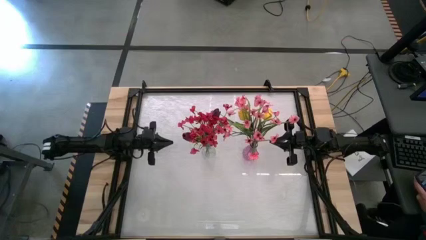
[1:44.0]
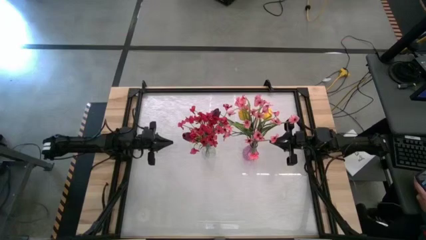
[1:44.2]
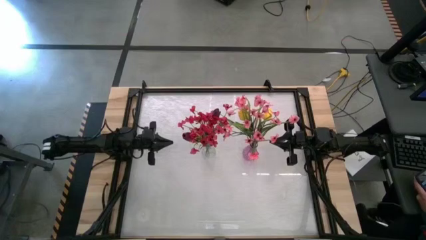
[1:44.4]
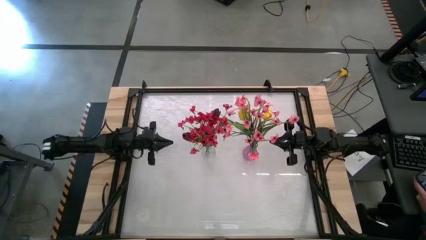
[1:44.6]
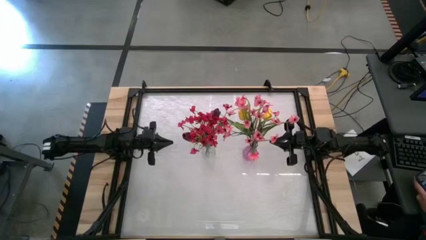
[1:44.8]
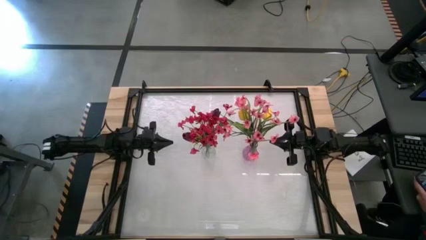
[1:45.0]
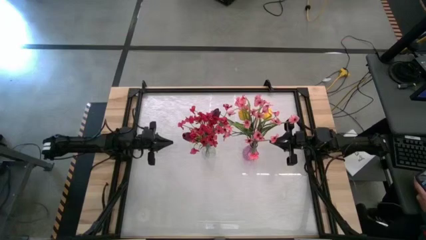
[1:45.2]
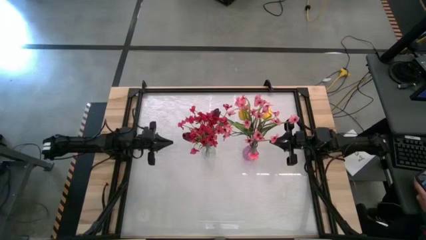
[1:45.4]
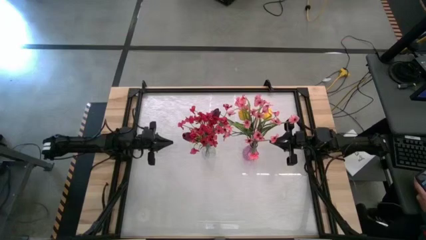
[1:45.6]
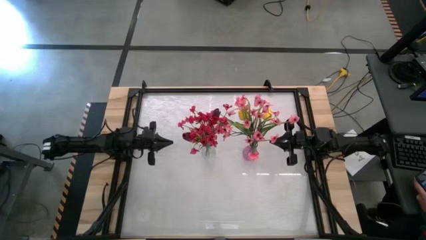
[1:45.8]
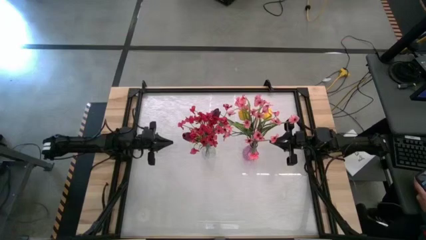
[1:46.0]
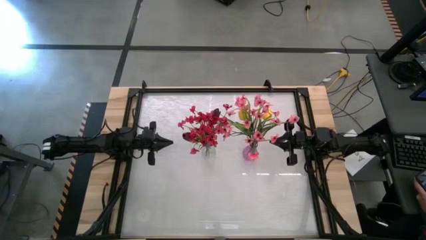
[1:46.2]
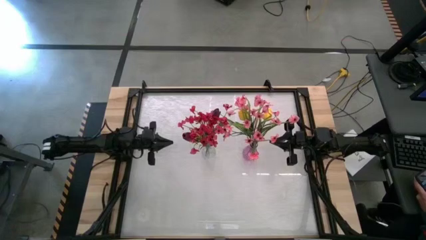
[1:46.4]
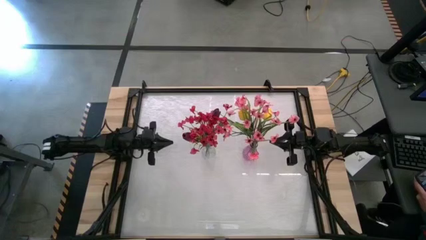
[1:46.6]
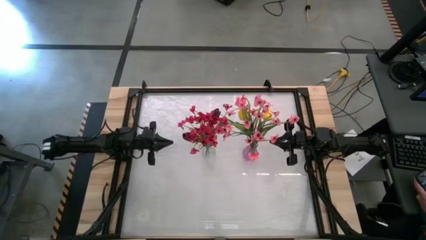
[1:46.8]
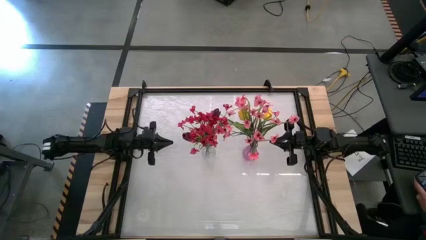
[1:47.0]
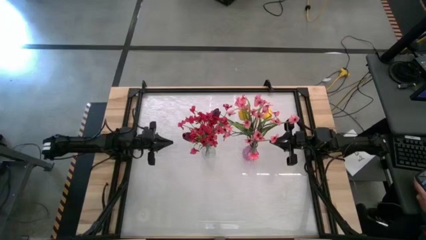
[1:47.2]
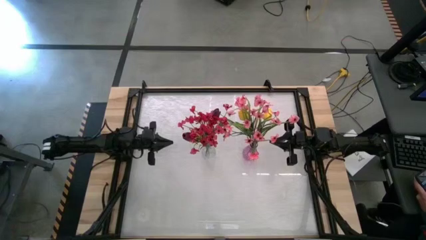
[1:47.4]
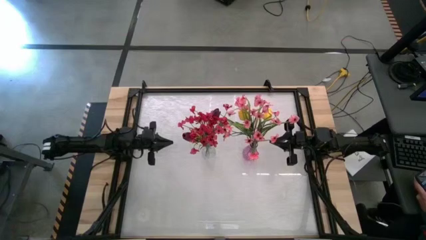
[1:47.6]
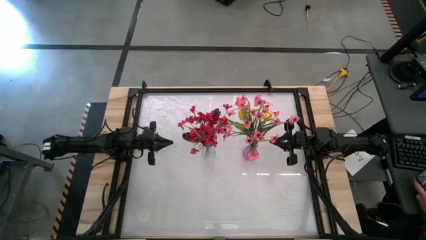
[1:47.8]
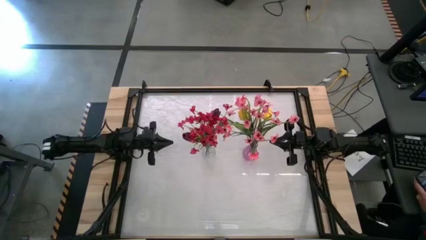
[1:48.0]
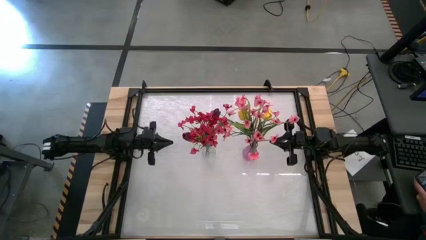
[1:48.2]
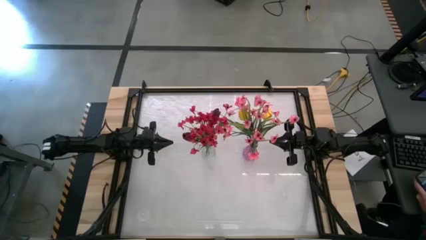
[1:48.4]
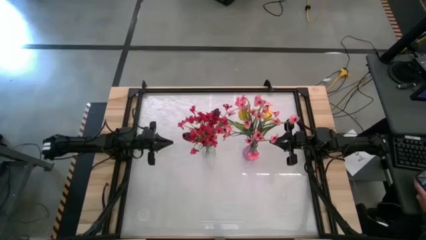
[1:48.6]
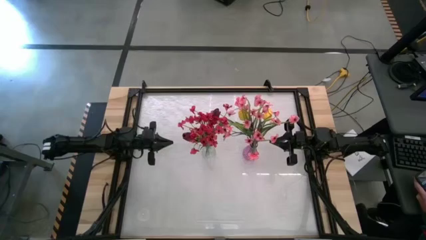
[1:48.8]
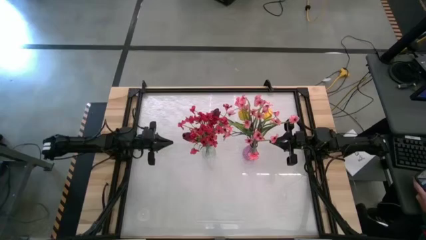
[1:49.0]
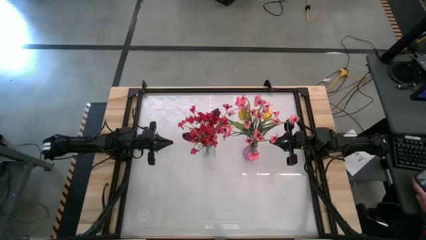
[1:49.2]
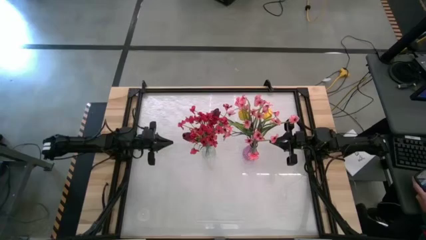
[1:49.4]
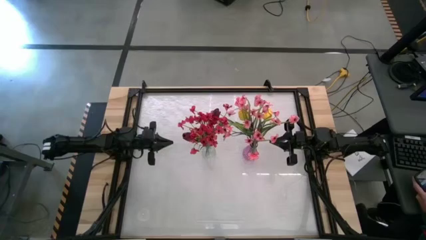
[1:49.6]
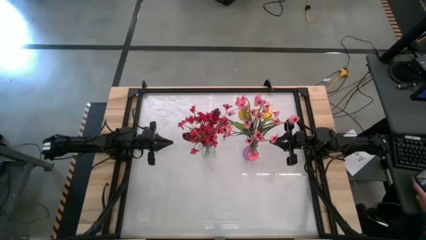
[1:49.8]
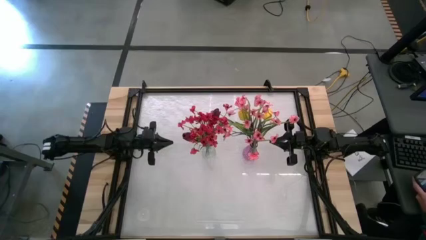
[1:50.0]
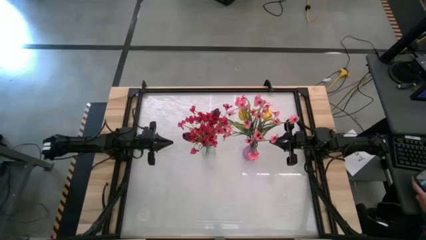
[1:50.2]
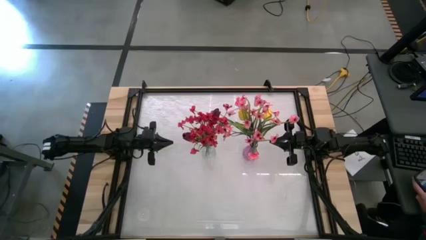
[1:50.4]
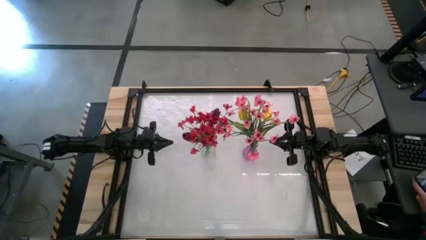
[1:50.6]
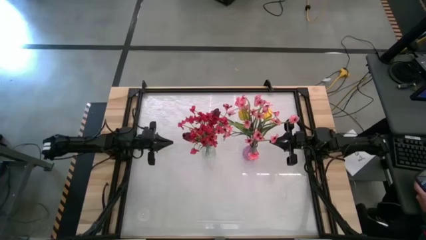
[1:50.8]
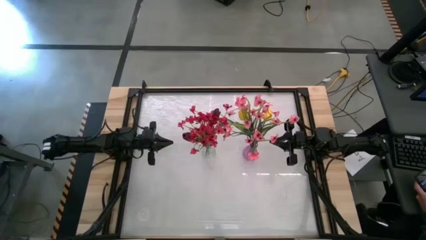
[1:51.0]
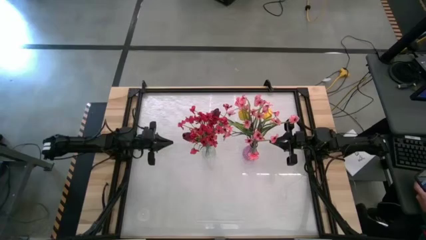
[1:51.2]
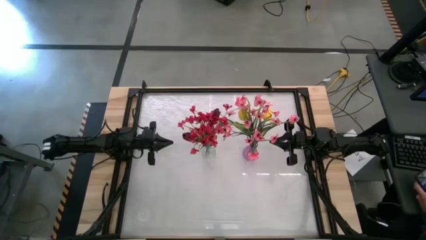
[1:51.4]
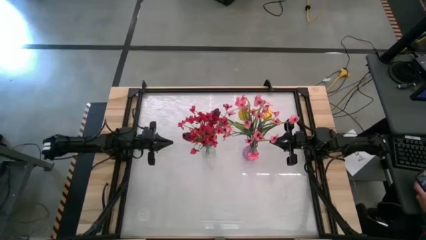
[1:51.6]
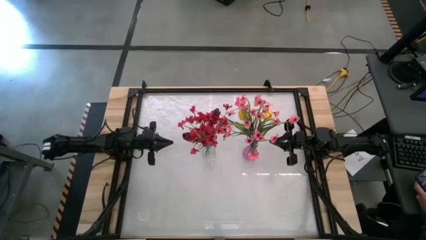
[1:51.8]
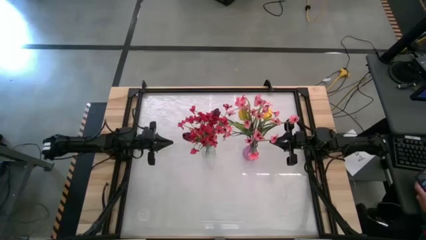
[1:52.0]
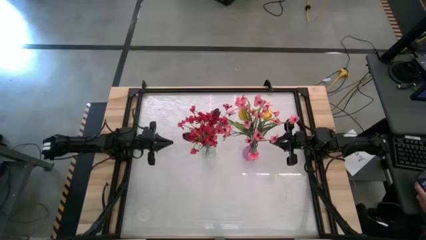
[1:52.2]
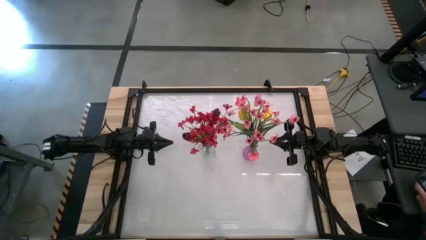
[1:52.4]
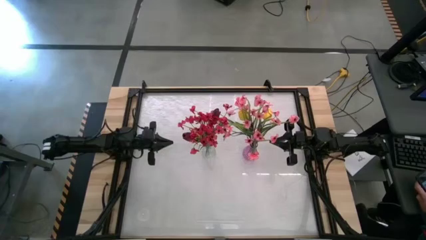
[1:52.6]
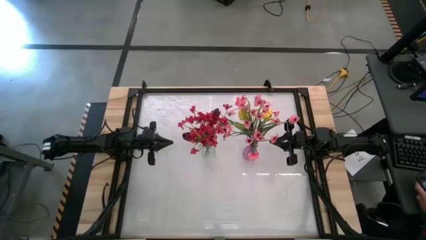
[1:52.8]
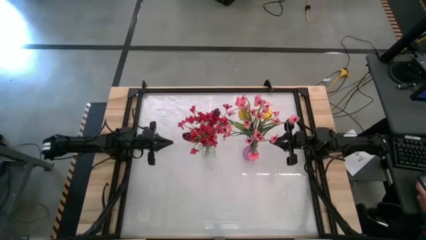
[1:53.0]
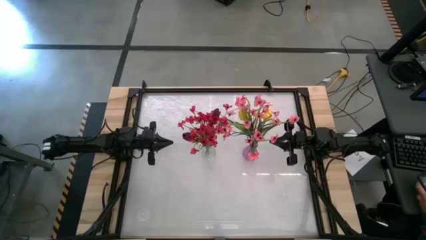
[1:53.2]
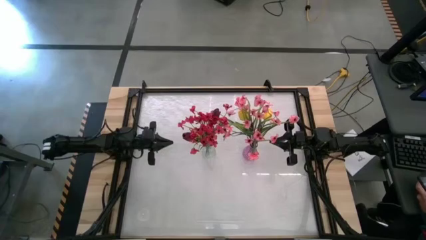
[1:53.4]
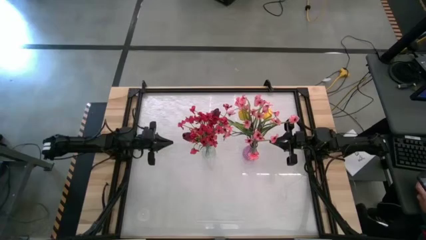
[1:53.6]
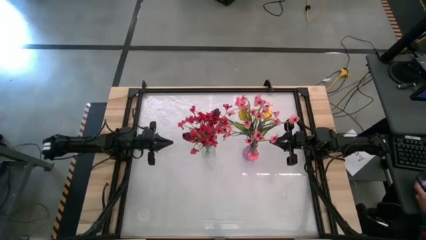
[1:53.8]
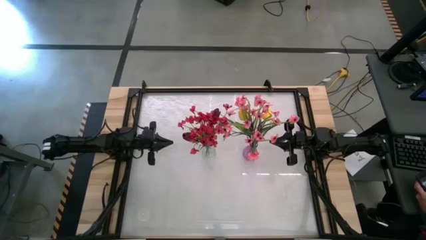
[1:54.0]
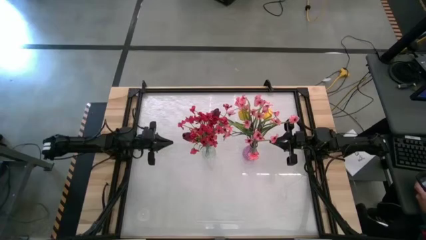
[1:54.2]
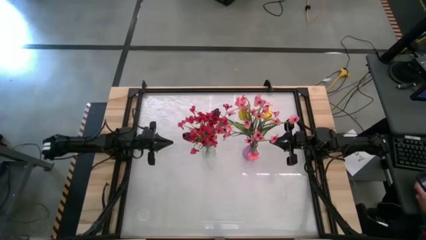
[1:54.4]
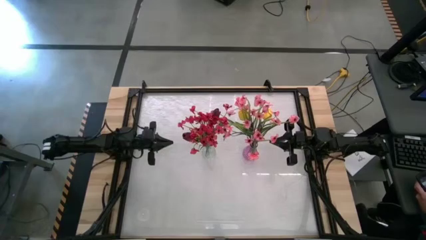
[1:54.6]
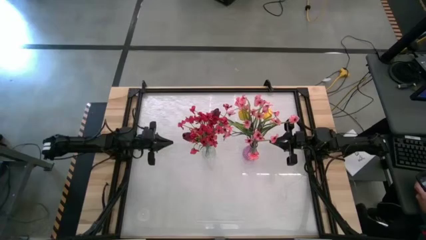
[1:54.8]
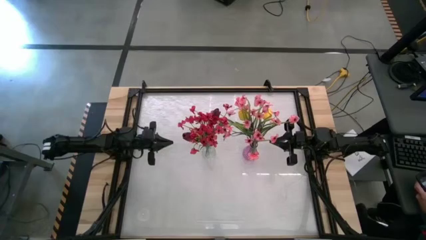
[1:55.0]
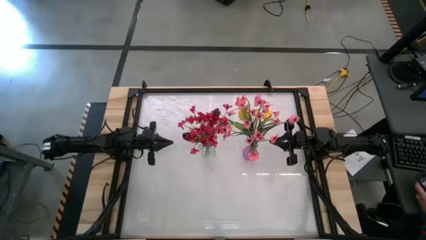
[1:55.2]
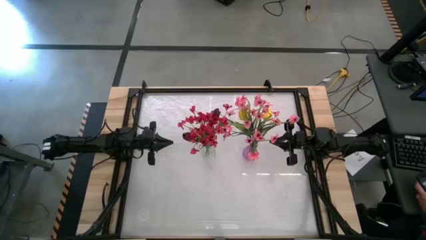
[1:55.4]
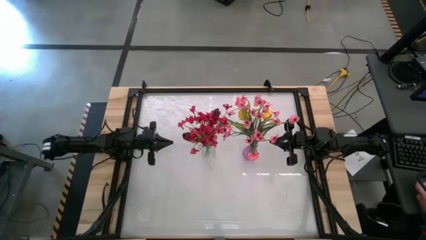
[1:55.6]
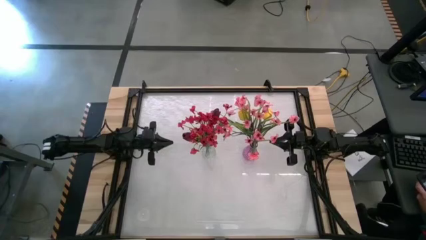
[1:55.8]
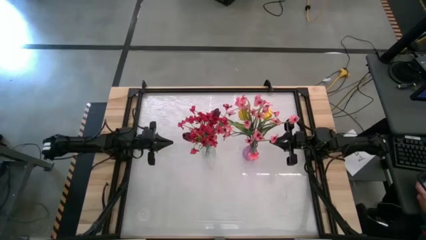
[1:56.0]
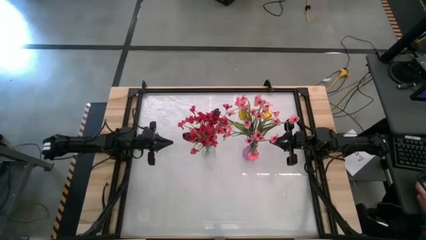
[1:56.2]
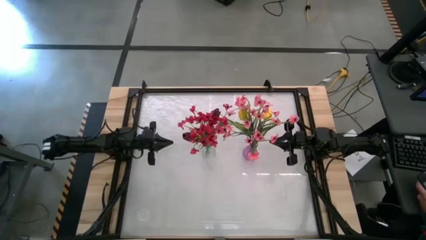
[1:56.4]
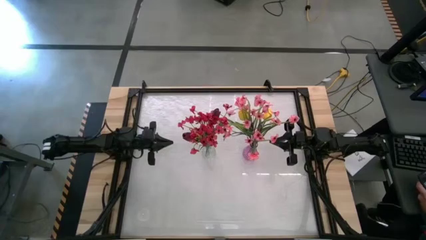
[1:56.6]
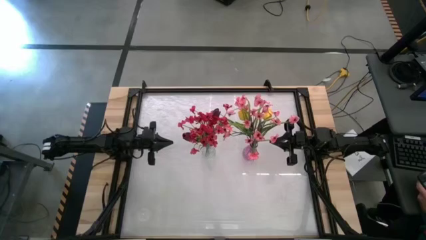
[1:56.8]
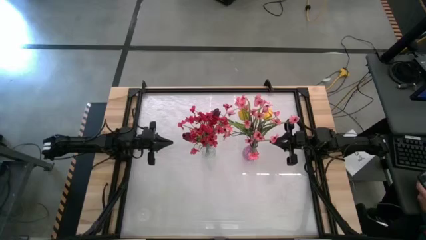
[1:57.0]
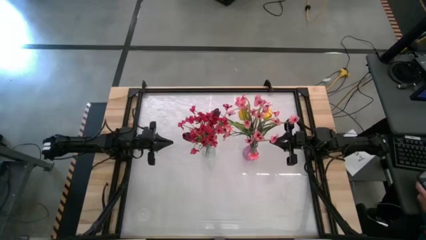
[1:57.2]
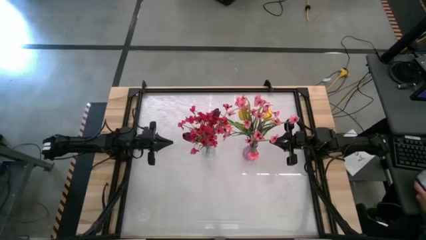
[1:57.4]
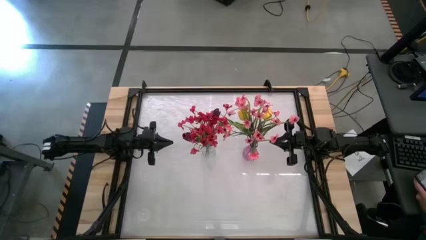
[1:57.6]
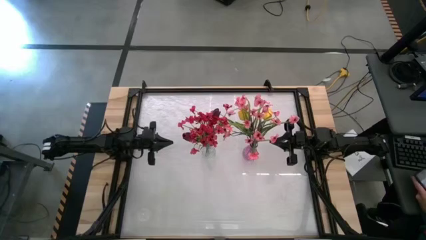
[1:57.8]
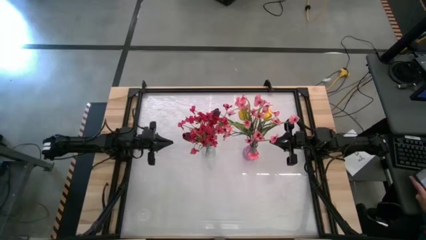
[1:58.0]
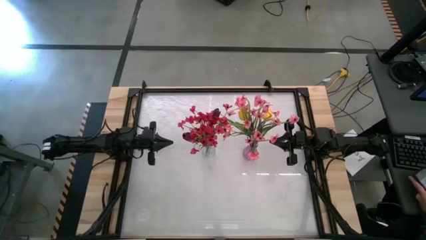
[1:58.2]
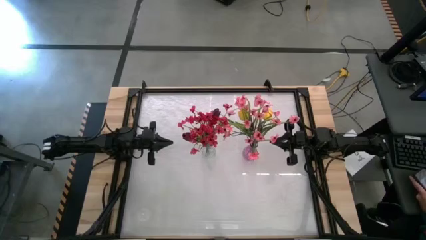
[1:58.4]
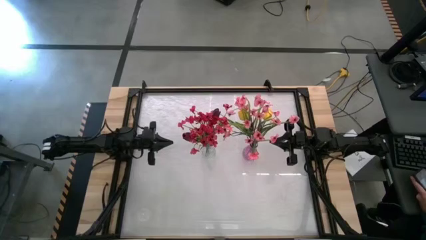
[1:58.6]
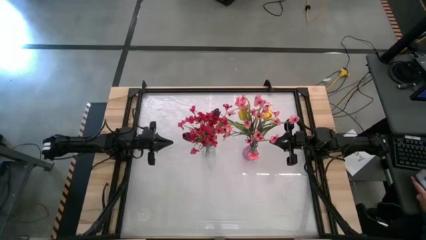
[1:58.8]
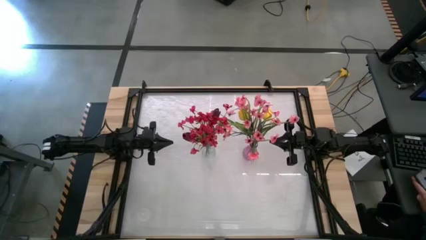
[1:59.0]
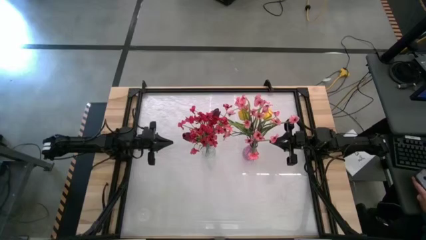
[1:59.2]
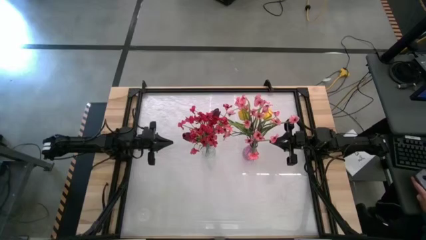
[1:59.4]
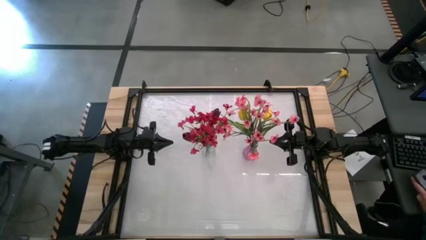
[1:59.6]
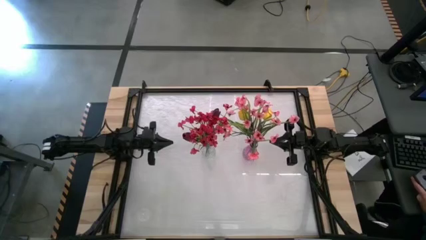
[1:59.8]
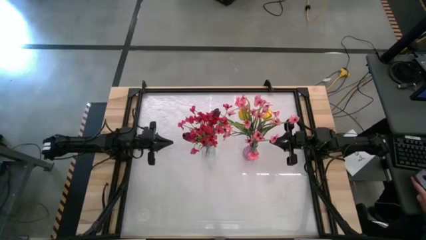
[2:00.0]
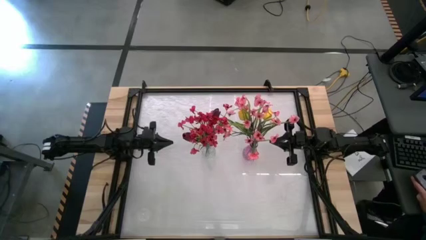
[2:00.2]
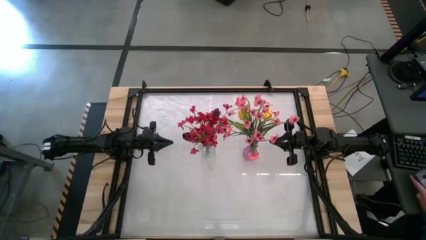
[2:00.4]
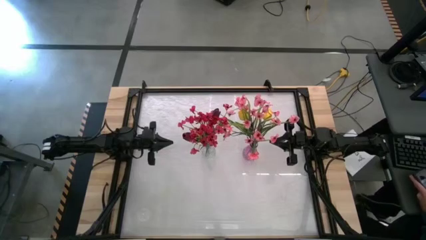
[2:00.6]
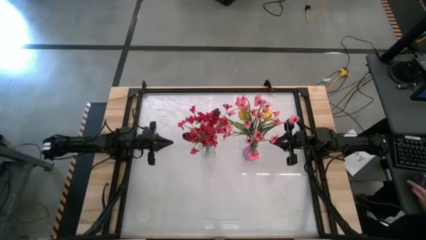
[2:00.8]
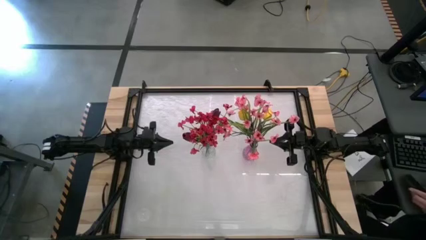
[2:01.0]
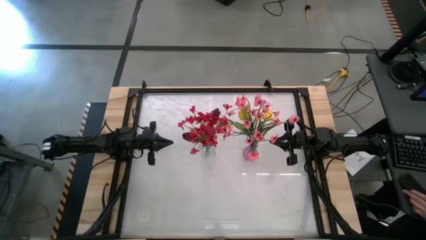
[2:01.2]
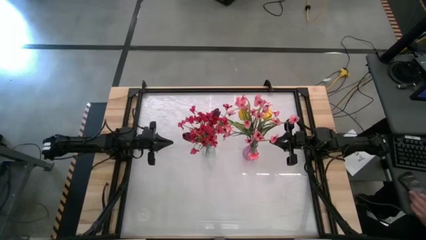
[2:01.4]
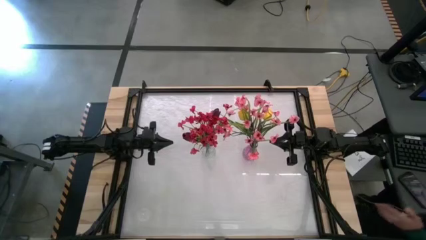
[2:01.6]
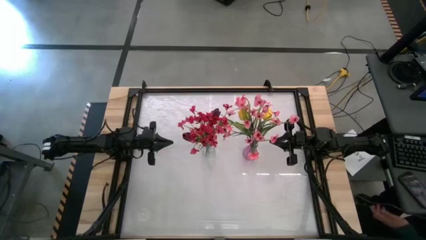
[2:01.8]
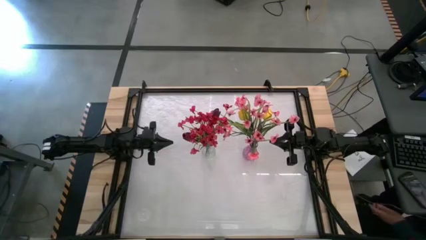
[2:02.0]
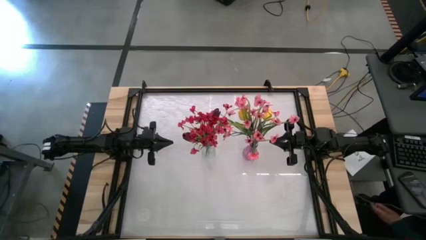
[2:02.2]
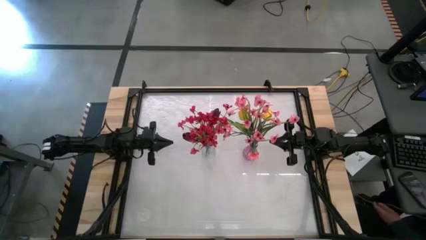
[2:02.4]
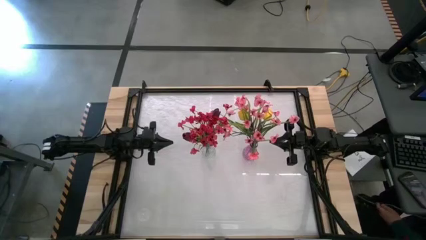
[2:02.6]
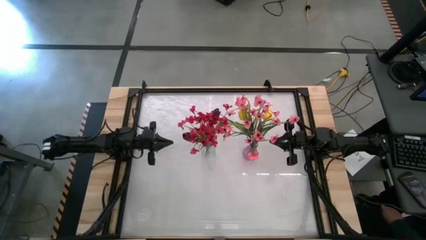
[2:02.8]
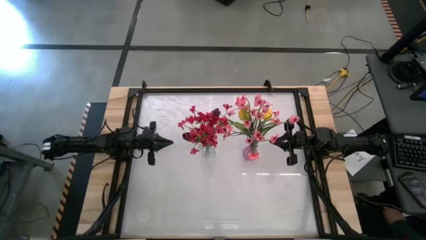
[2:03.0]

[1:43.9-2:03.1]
Task: Sort flowers into vase by color
Return to Home Position
